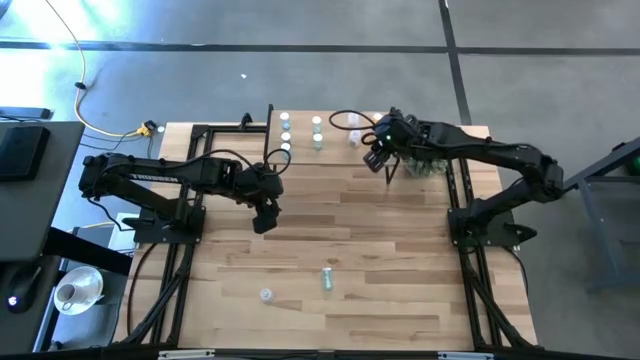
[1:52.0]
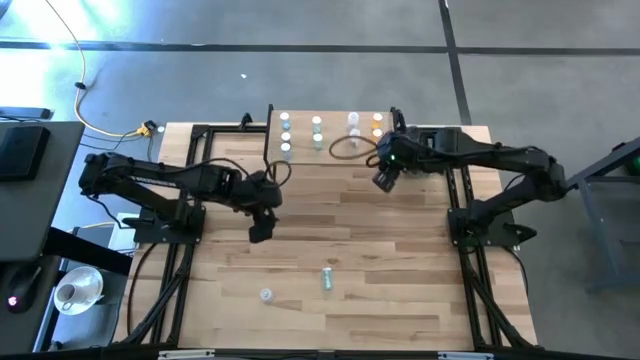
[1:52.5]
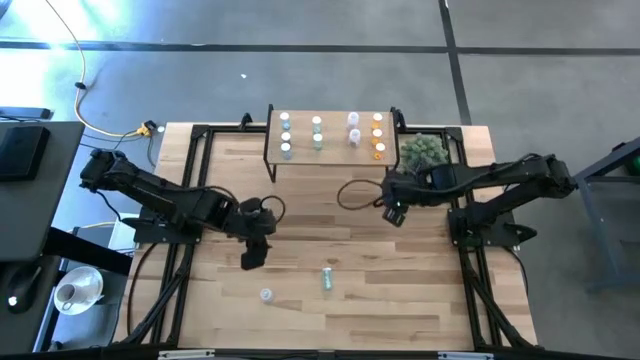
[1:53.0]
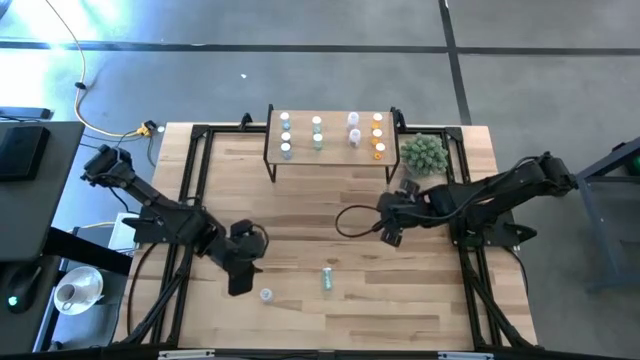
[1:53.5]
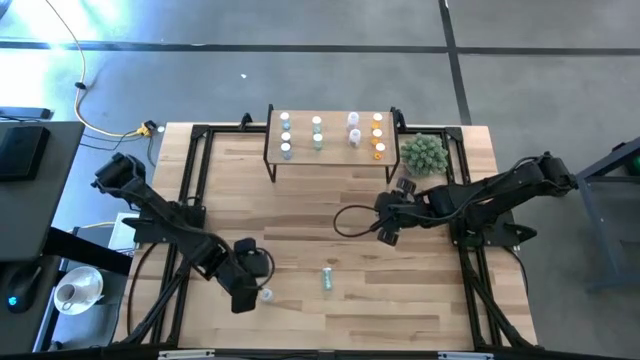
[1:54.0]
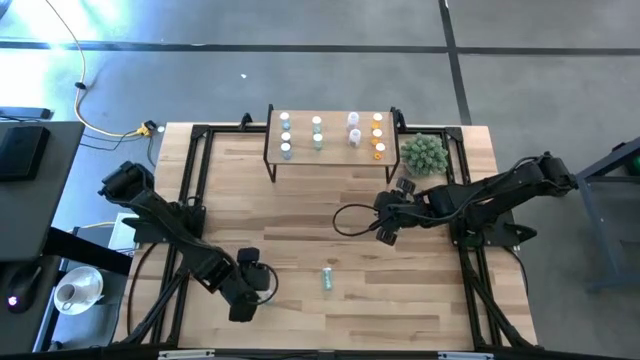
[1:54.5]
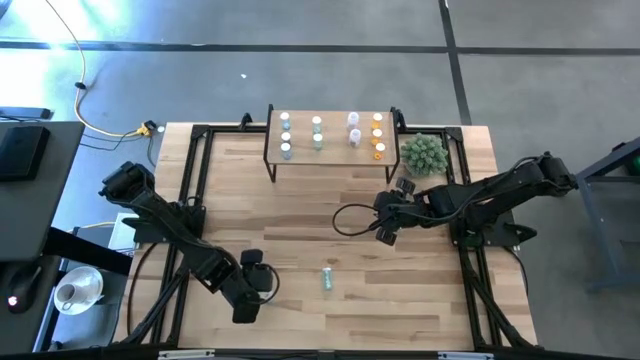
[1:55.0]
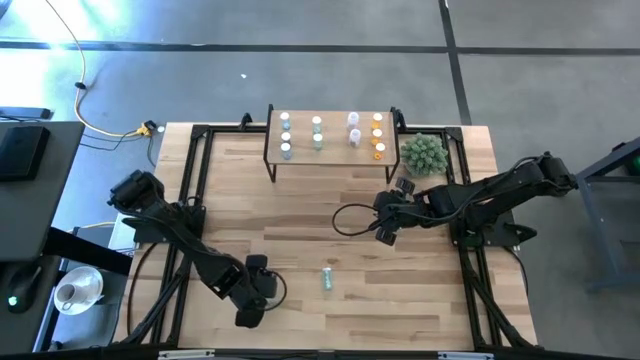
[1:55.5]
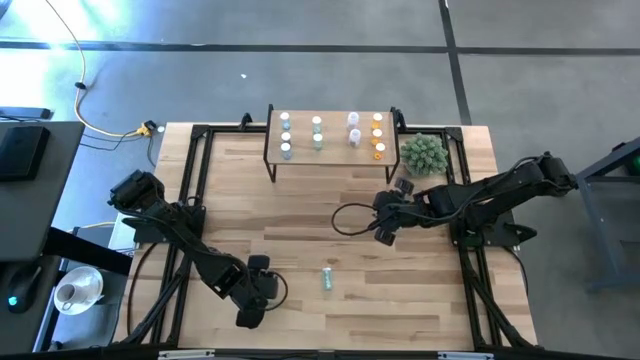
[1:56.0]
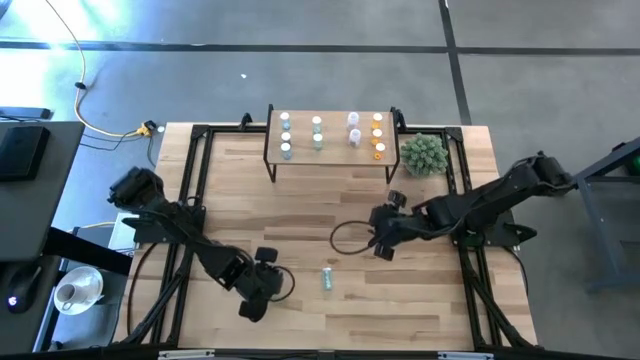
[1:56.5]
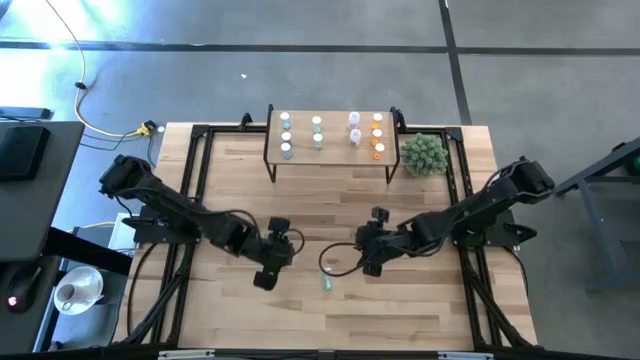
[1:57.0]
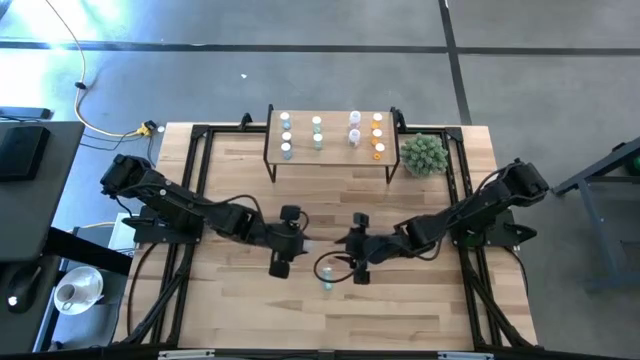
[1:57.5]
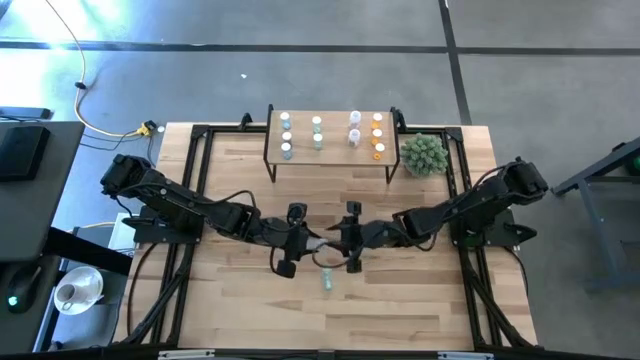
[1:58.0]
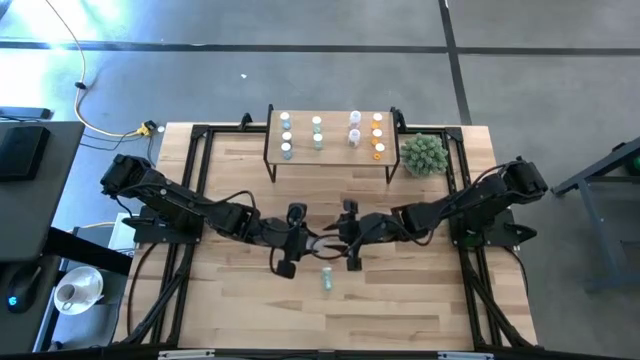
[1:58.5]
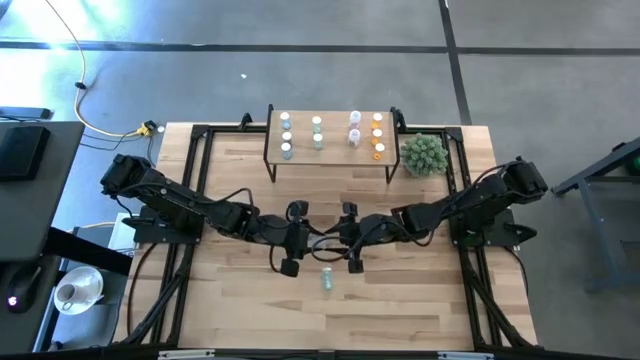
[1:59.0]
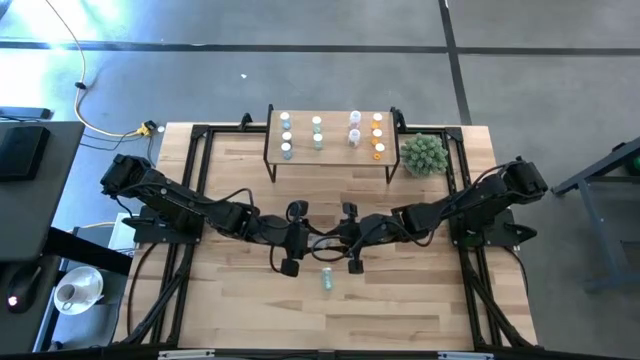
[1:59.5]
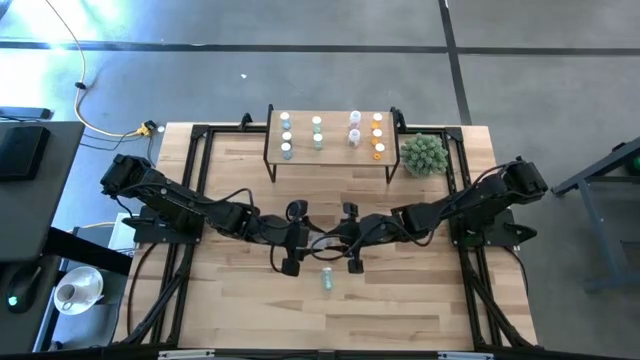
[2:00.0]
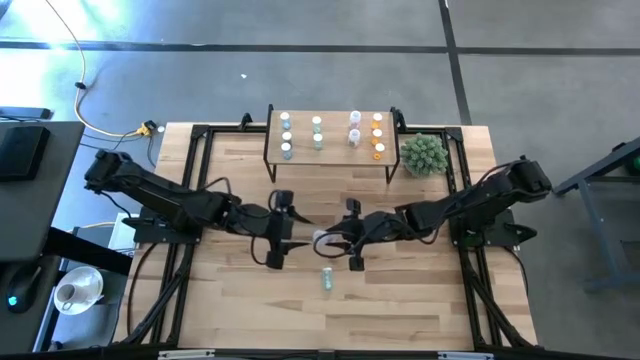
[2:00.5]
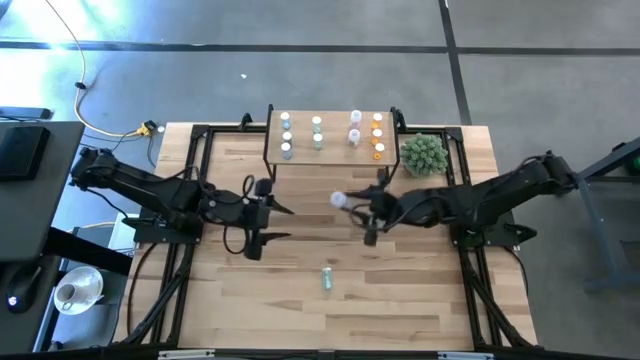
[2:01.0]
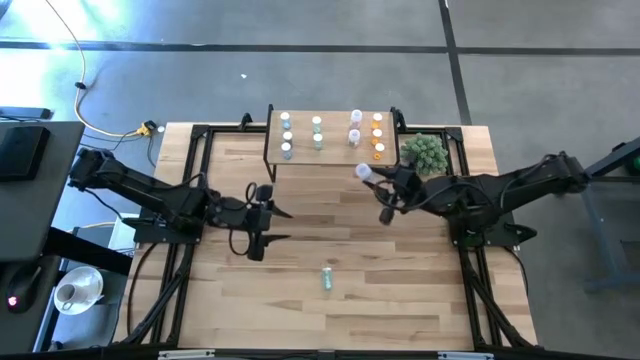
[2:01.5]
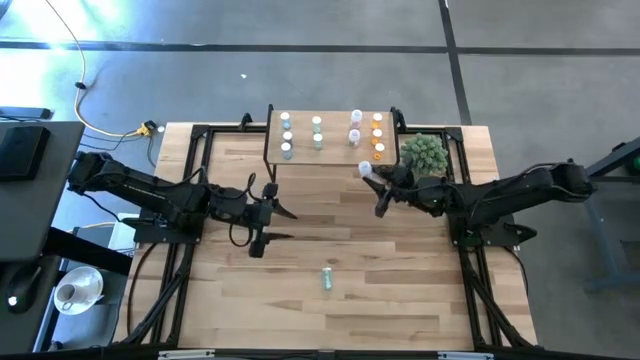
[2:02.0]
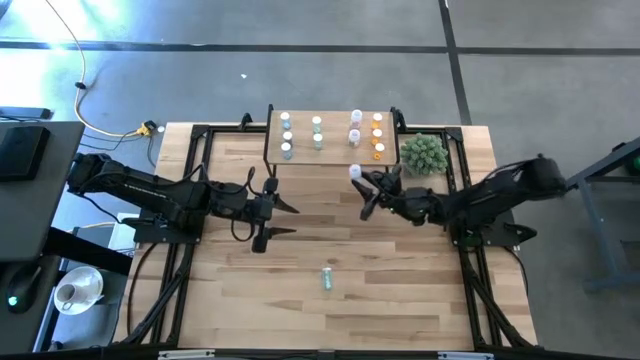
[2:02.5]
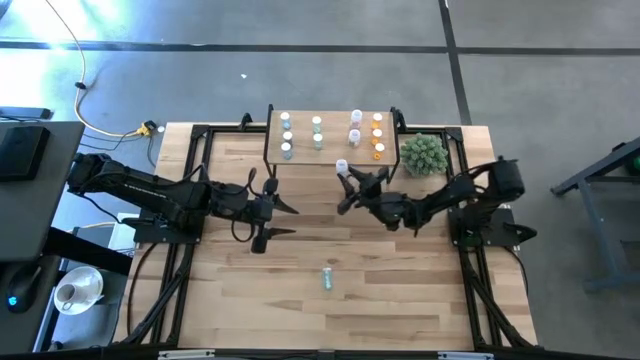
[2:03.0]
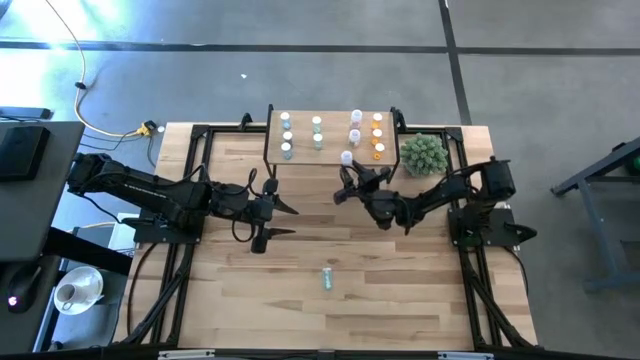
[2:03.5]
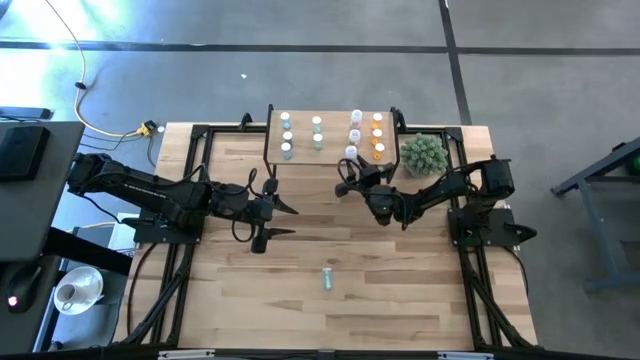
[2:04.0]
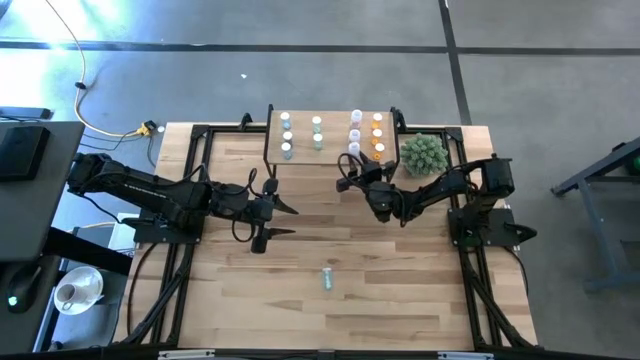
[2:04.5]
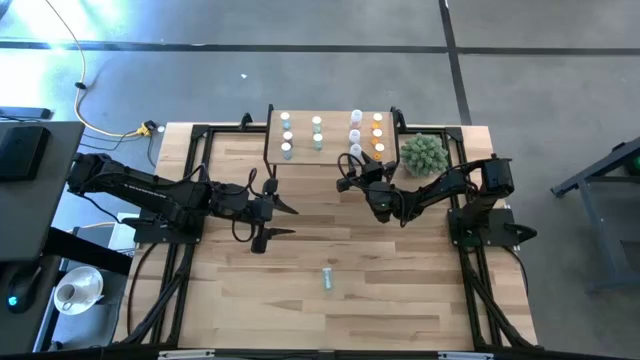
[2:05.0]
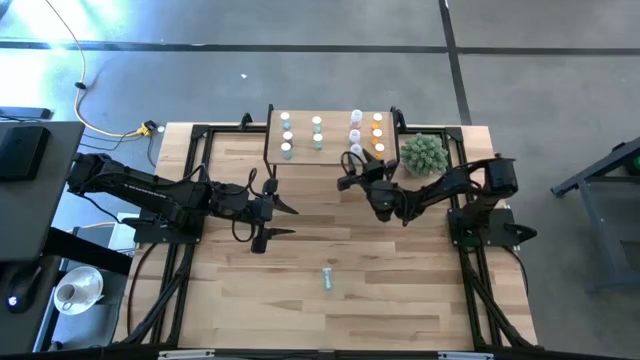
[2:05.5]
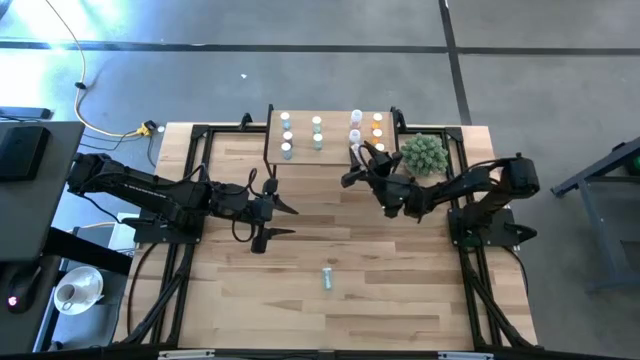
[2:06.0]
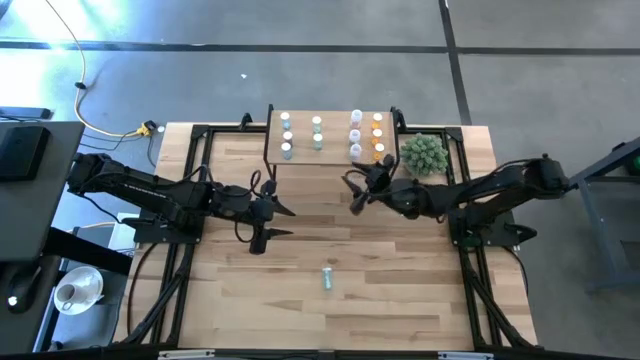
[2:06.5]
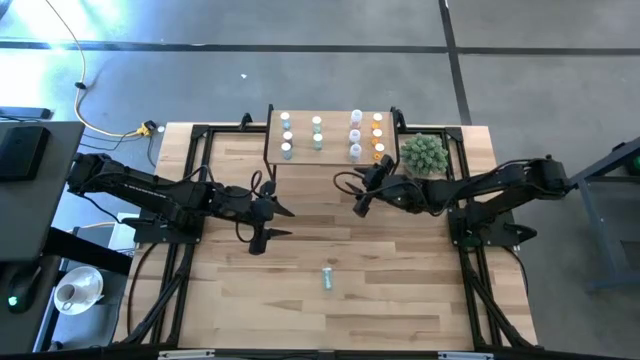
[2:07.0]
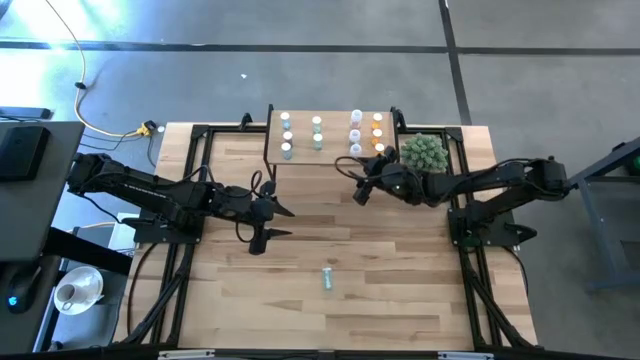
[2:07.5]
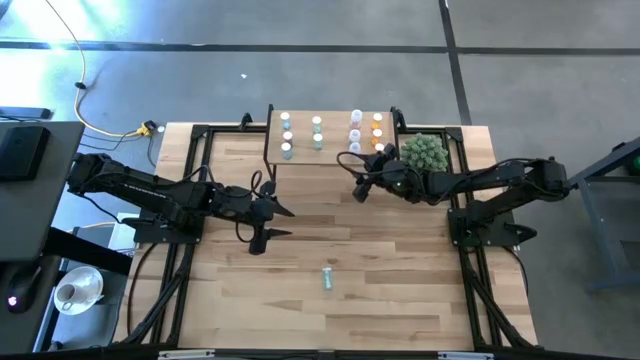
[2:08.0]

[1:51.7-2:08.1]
Task: Pick and place medicine bottles onto shelf by color
Put the transparent pill bottle on the shelf aligned with the other transparent pill bottles

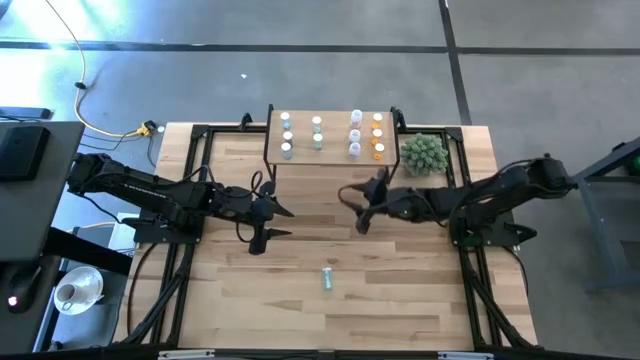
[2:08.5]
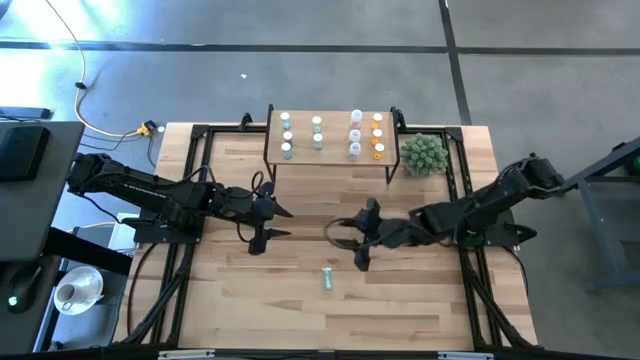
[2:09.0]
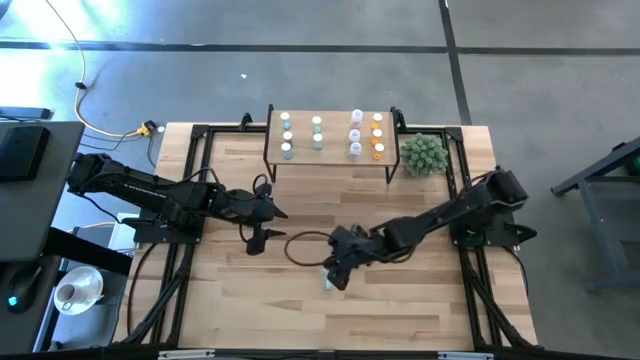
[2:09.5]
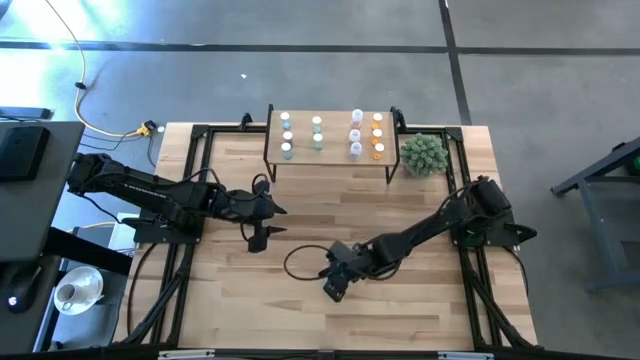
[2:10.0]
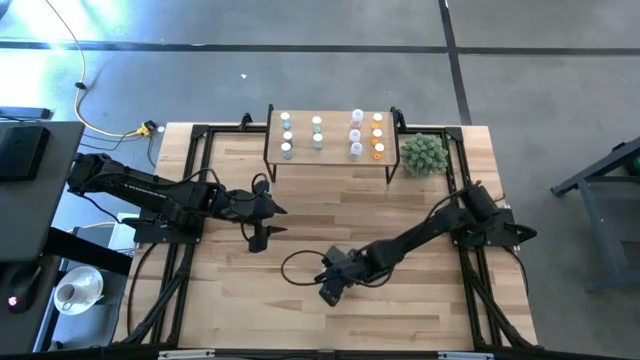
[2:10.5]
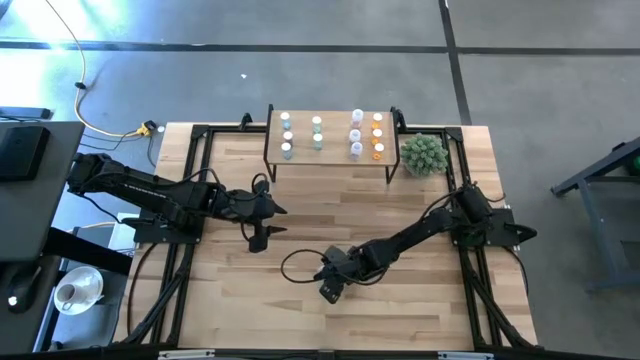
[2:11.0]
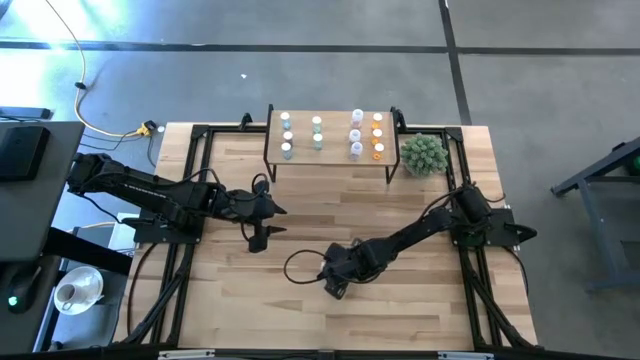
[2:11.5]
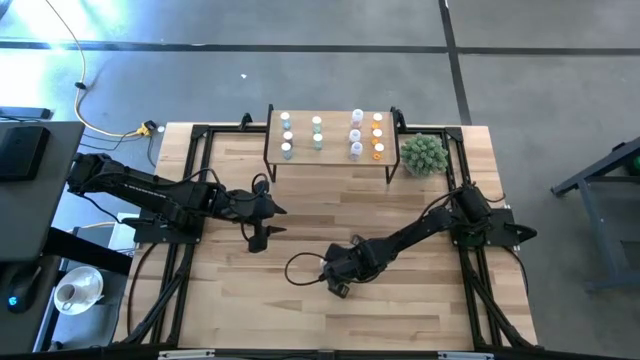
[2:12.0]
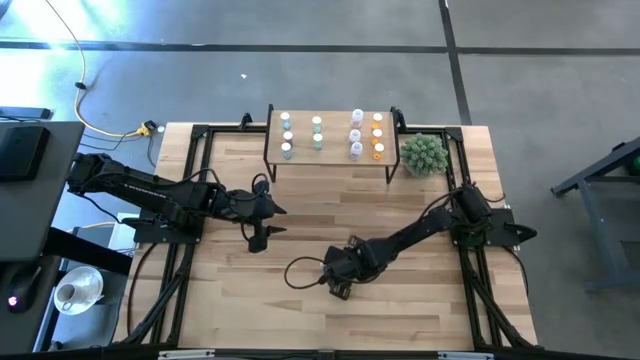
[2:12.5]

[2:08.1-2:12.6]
Put the green pill bottle on the shelf aligned with the other green pill bottles
